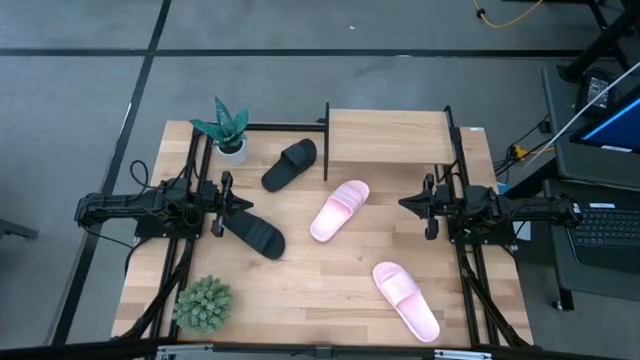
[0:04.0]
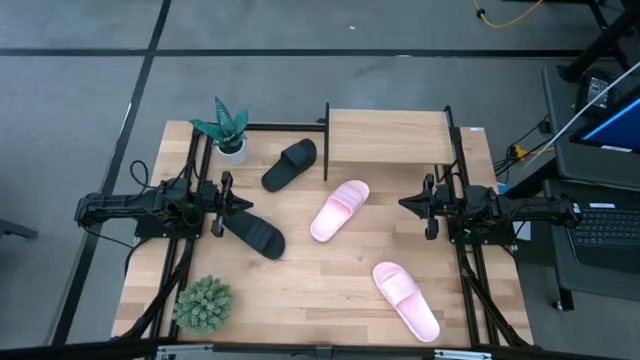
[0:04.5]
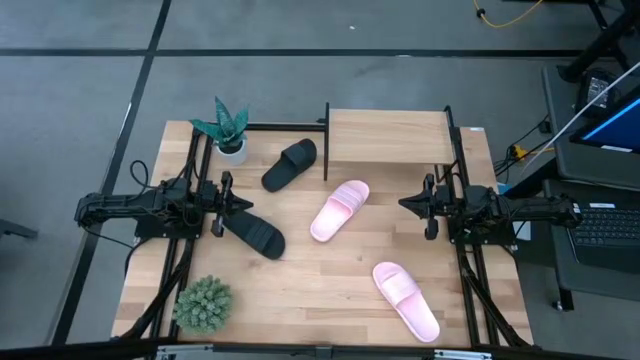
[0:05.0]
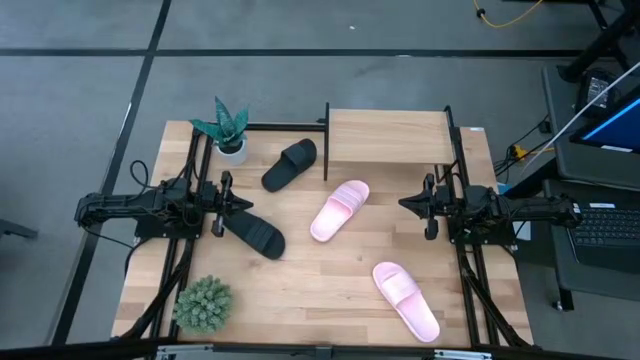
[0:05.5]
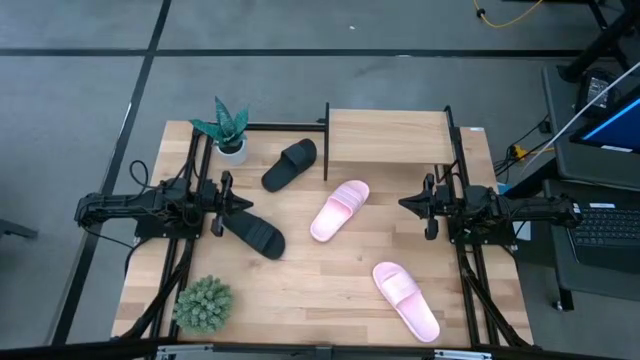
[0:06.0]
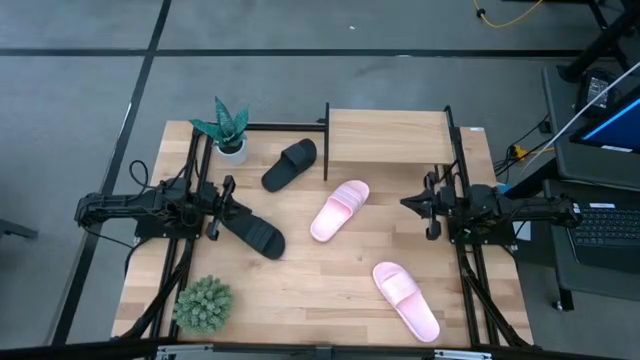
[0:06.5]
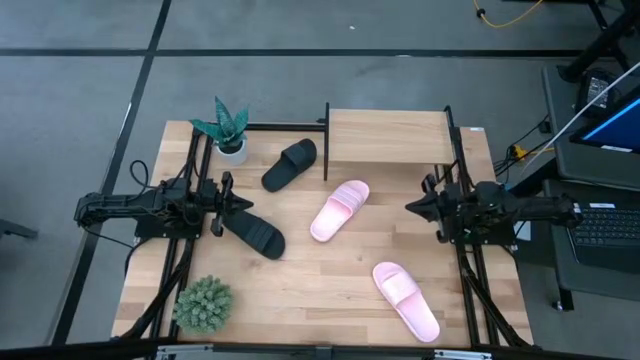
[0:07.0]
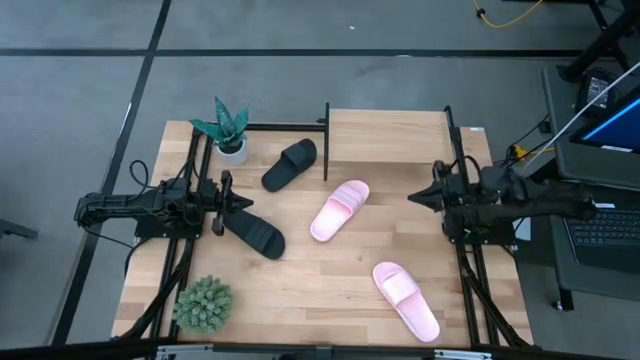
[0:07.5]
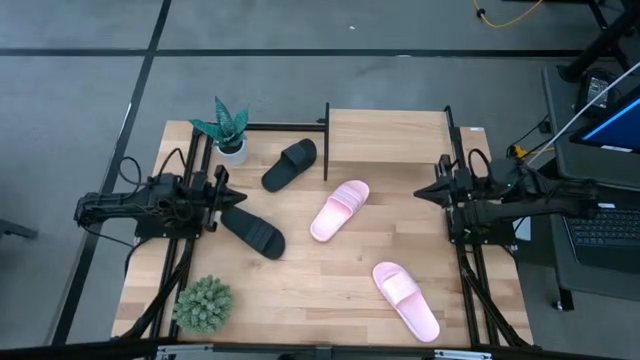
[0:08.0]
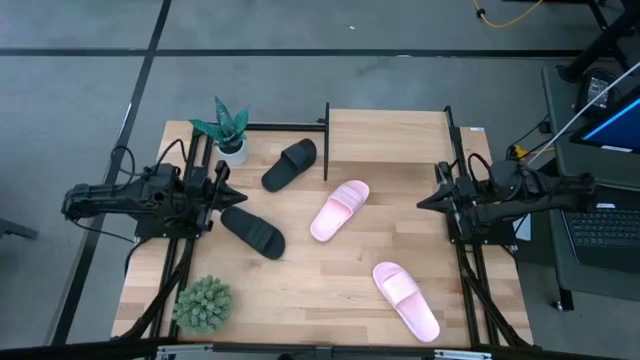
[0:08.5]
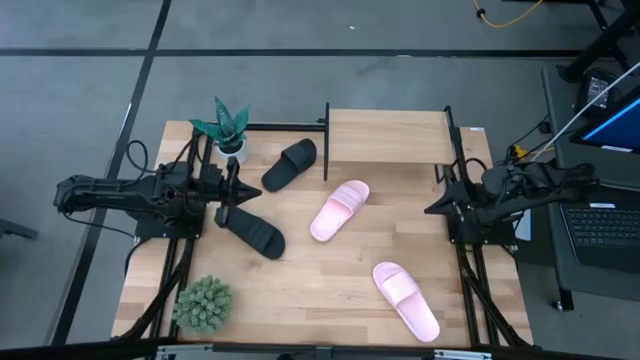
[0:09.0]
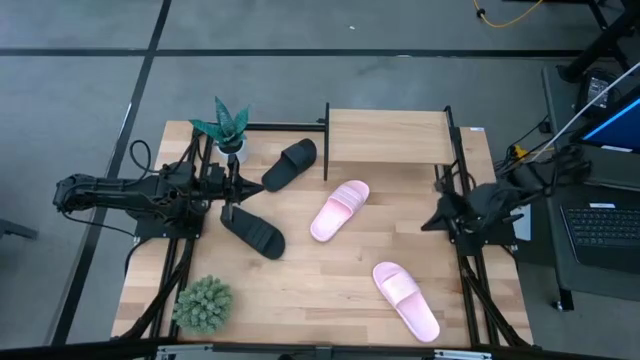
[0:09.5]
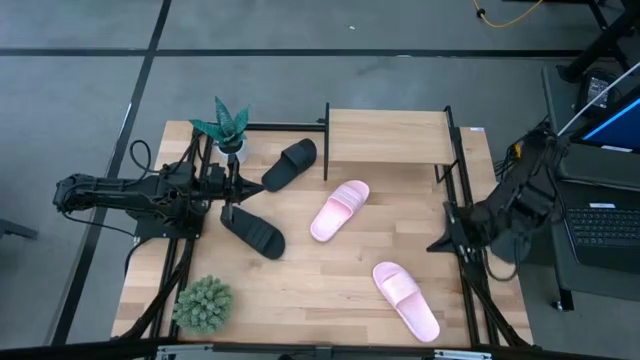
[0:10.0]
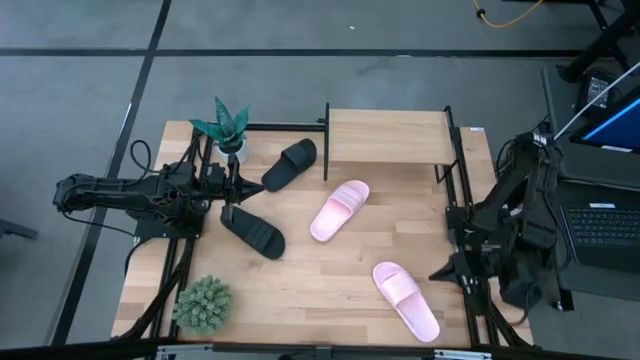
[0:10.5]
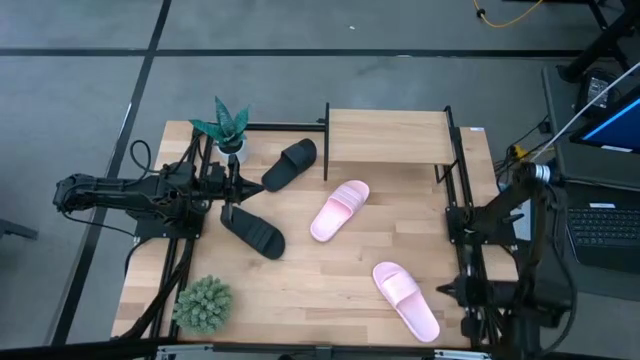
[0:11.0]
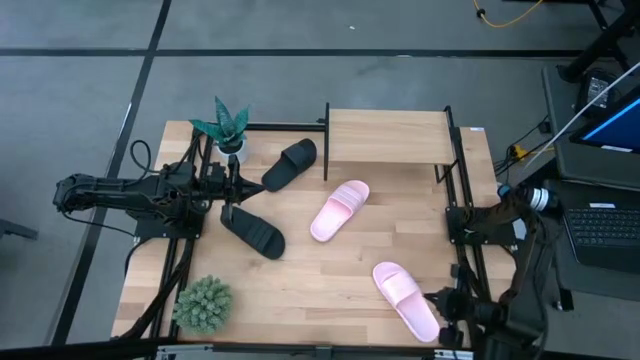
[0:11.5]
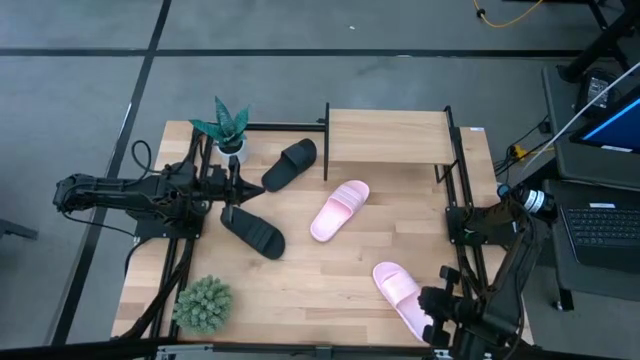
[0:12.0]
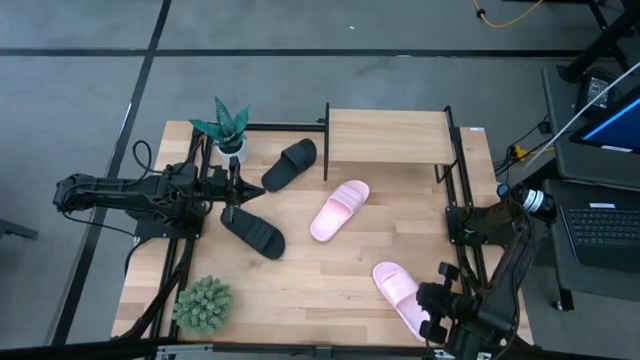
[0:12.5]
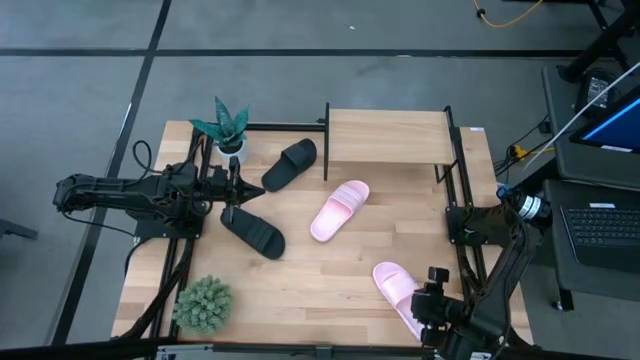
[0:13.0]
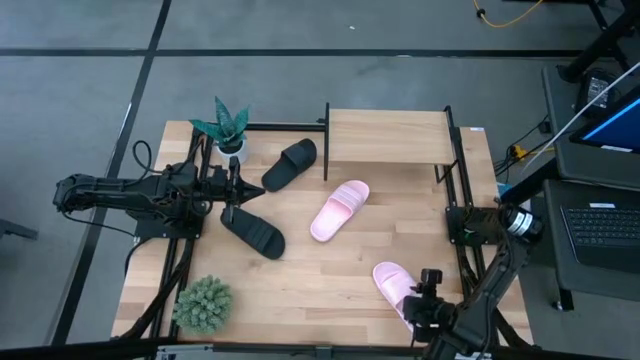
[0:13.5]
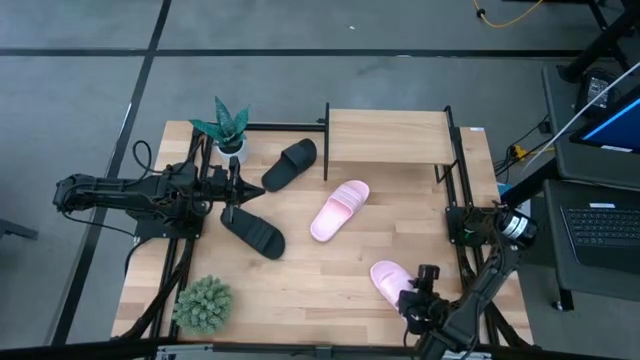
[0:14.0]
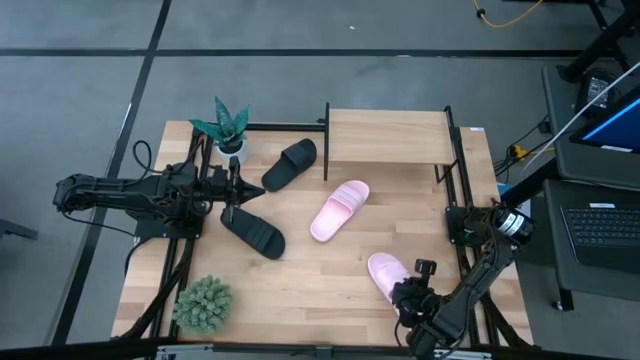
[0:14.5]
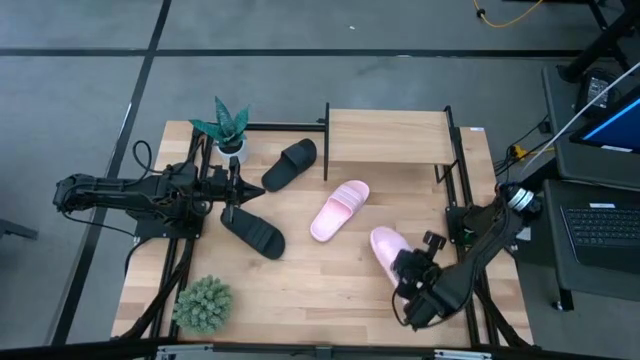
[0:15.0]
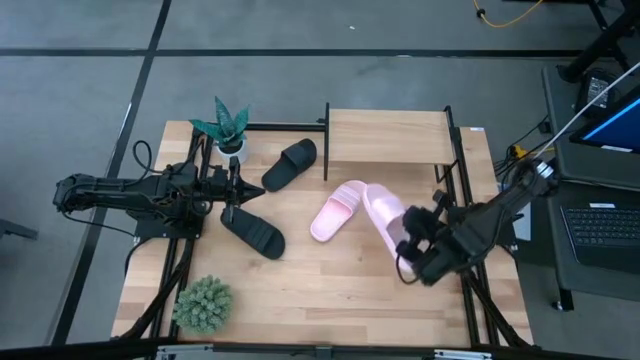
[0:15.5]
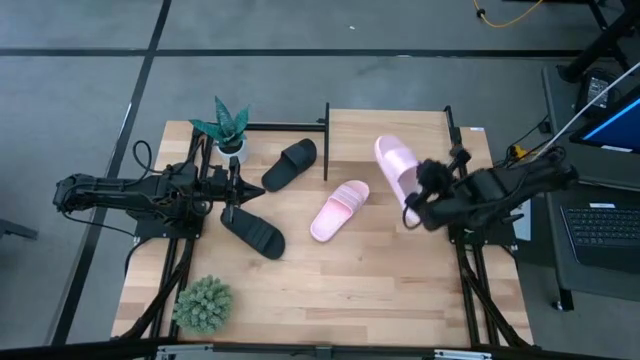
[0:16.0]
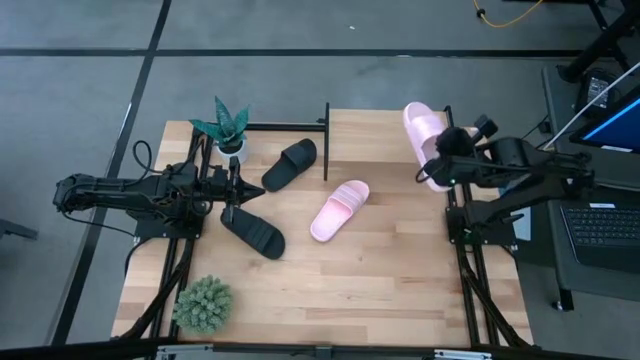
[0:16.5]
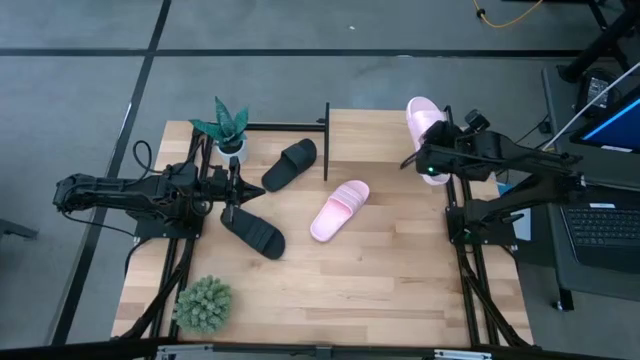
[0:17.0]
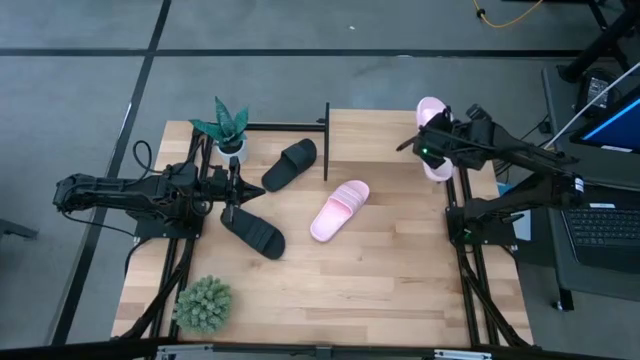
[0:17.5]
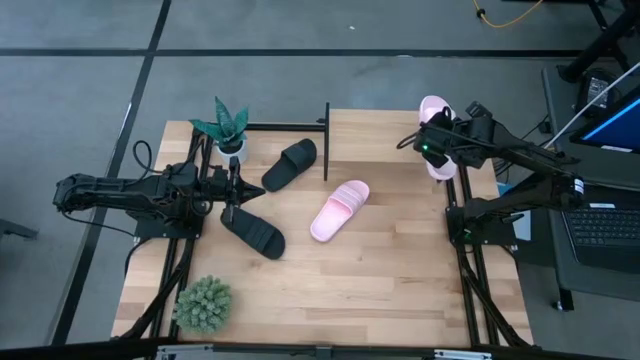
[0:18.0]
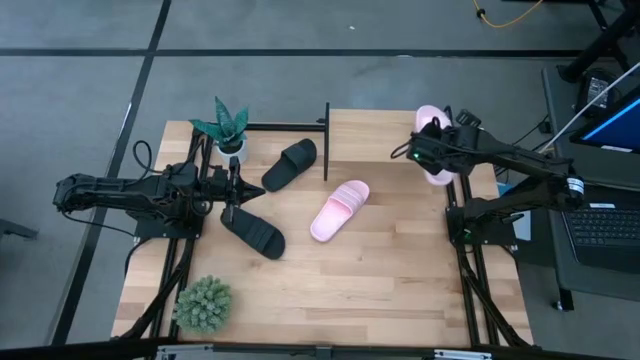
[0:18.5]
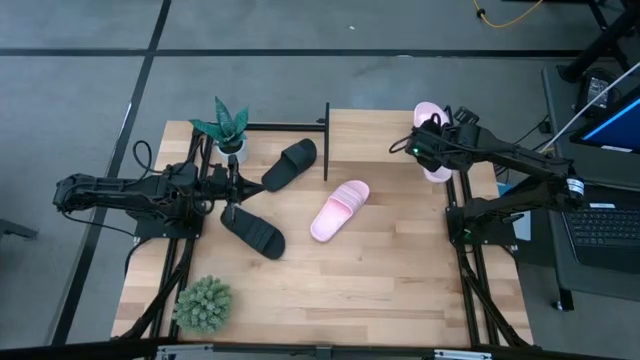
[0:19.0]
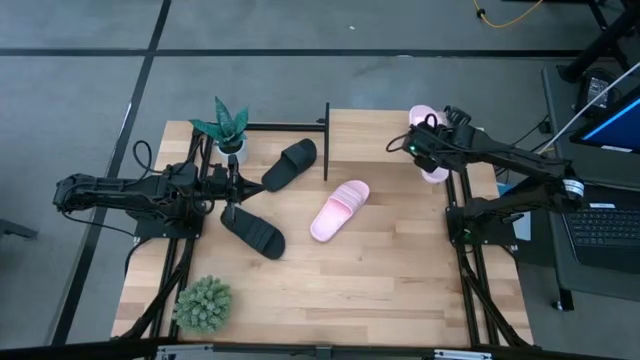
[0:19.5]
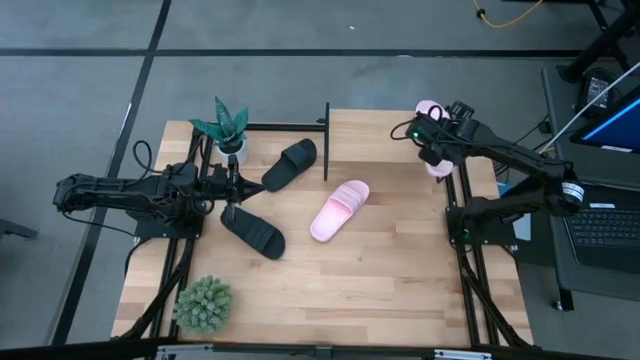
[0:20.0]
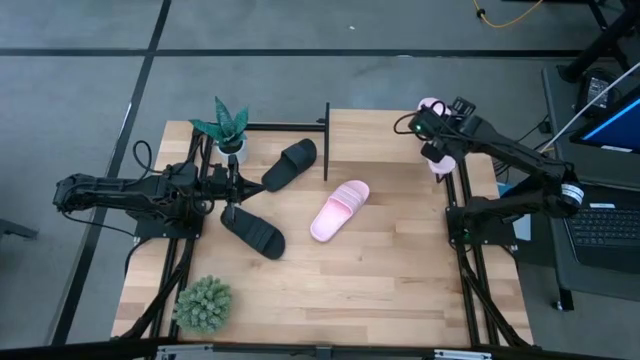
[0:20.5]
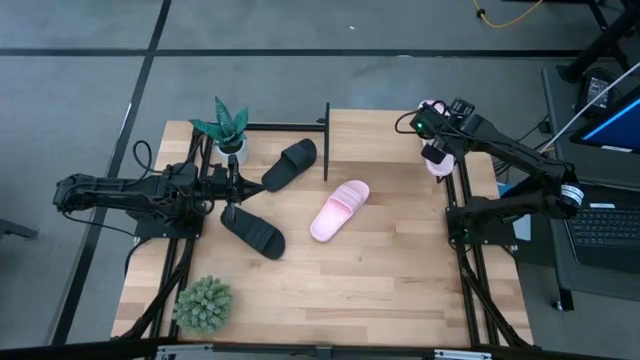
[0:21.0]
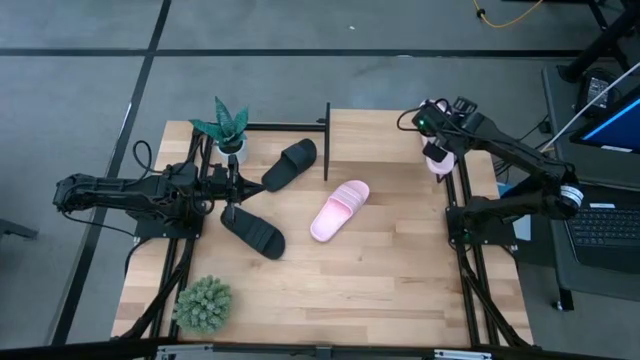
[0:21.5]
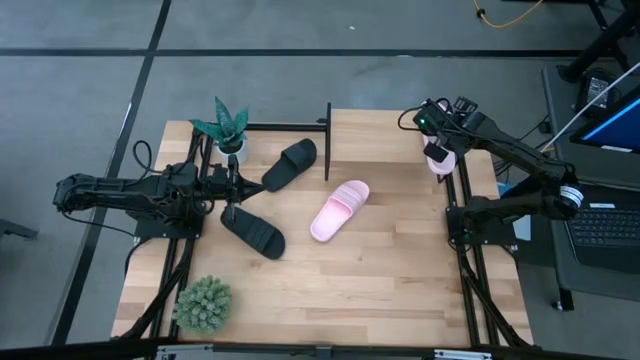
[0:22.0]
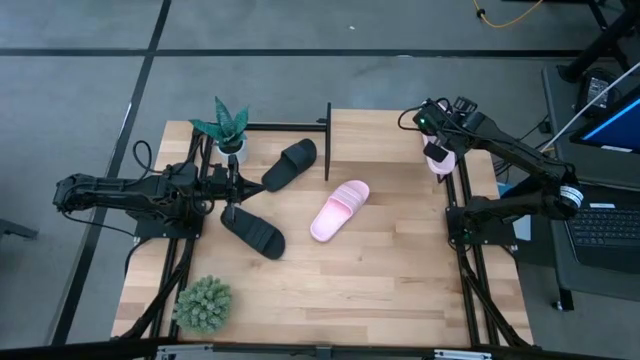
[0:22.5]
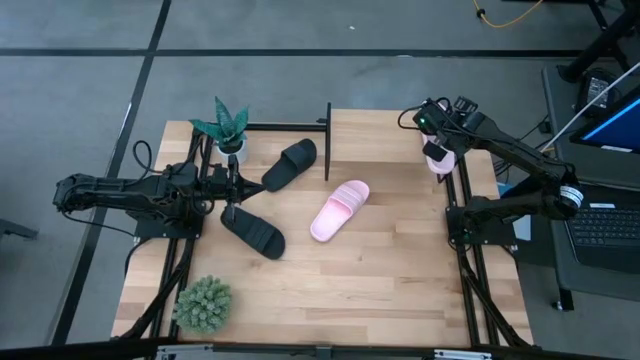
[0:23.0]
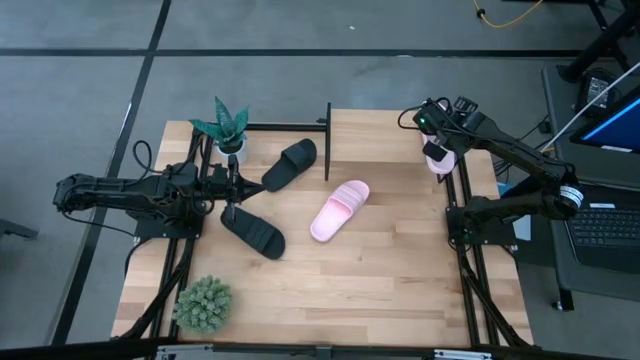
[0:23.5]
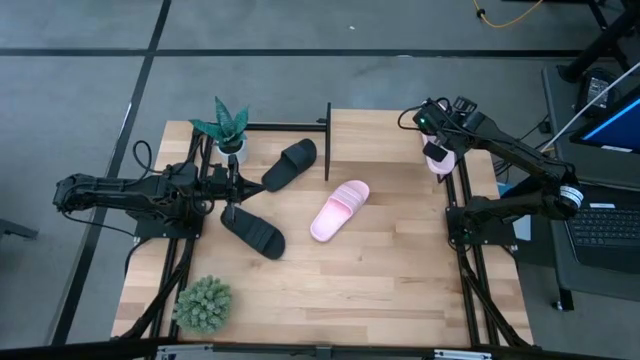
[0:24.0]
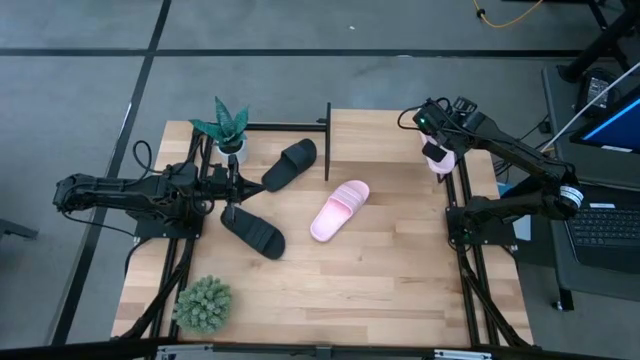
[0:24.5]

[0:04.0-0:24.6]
Task: Pick and place slides into the shelf
Put the bottom pink slide on the shelf
